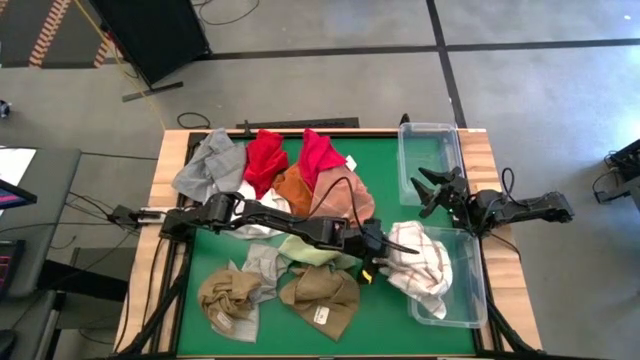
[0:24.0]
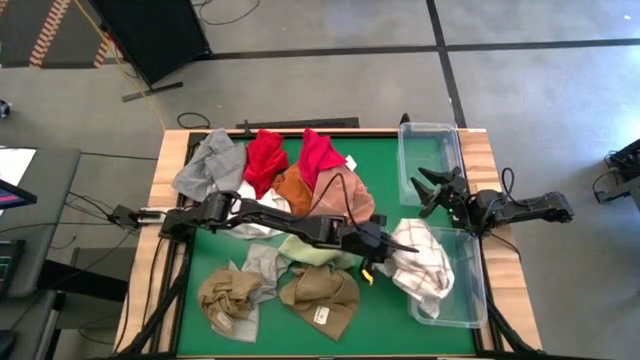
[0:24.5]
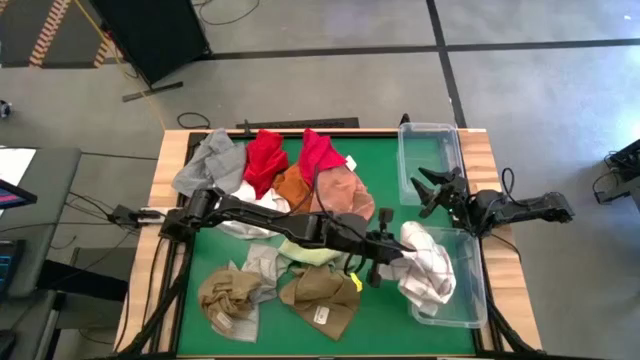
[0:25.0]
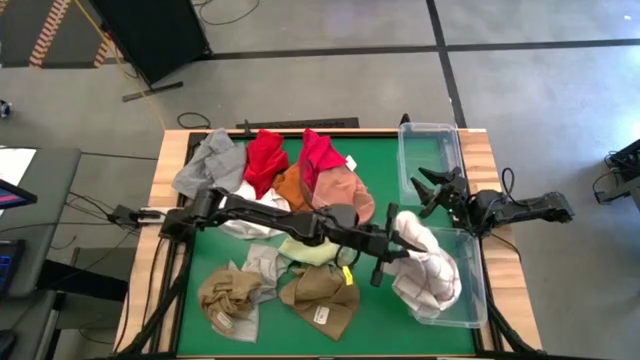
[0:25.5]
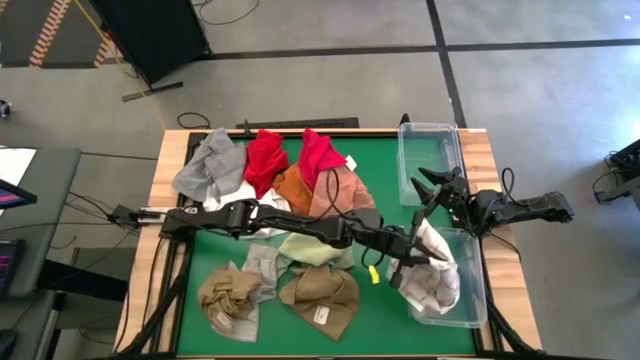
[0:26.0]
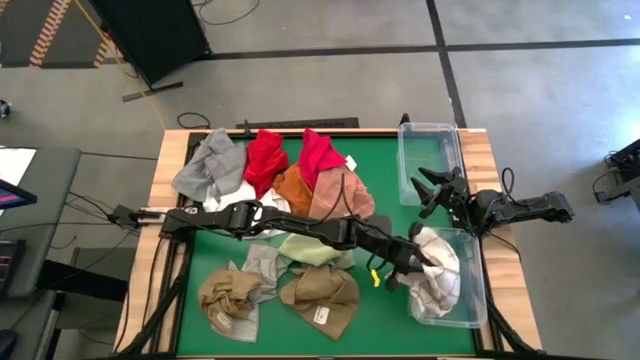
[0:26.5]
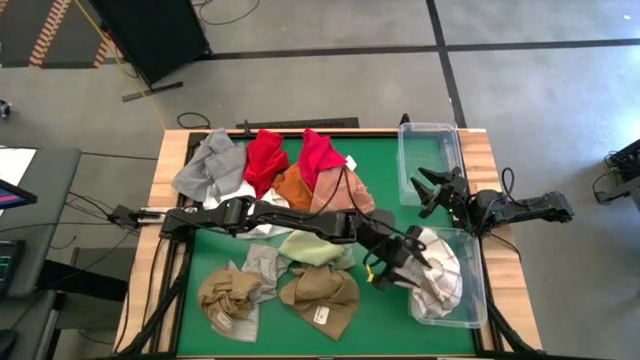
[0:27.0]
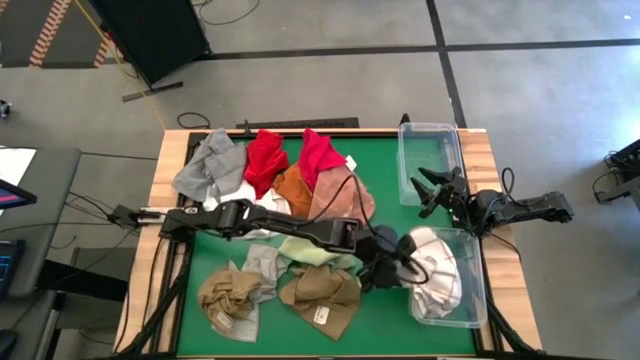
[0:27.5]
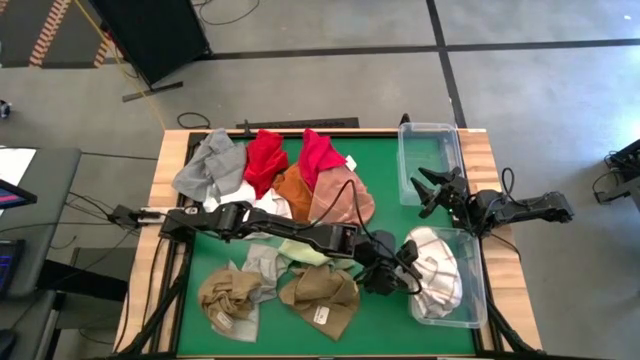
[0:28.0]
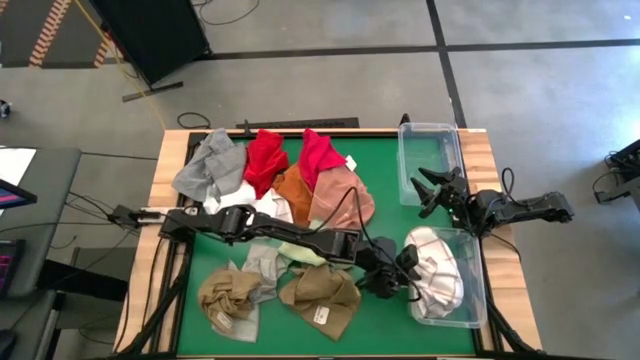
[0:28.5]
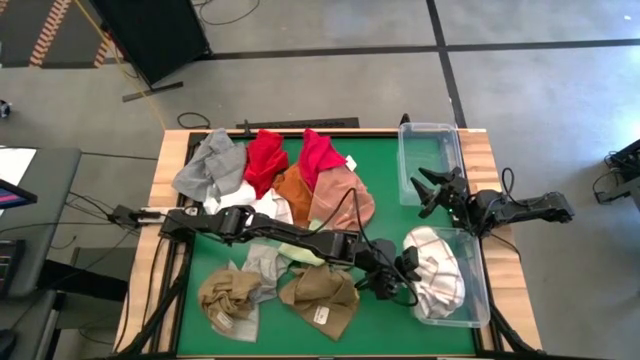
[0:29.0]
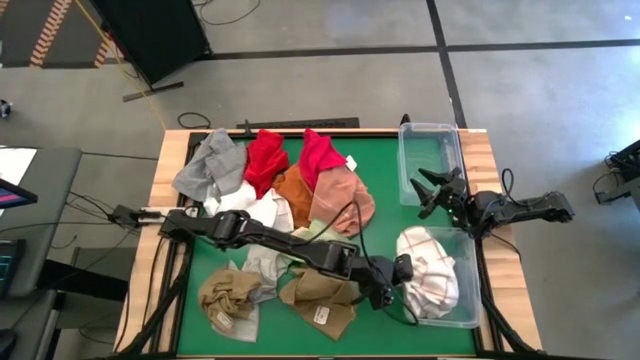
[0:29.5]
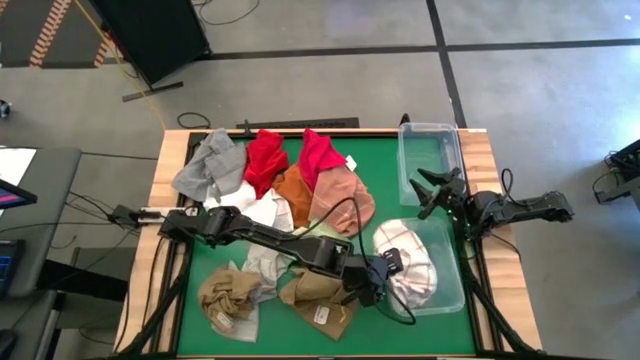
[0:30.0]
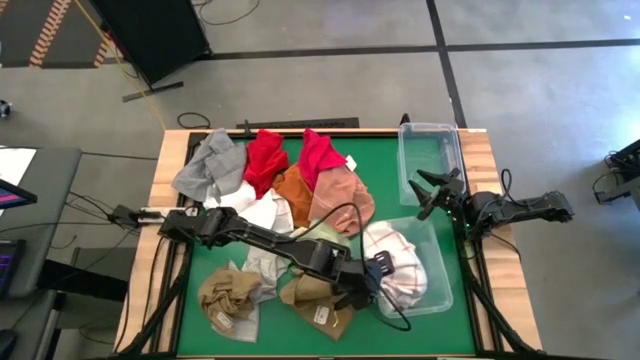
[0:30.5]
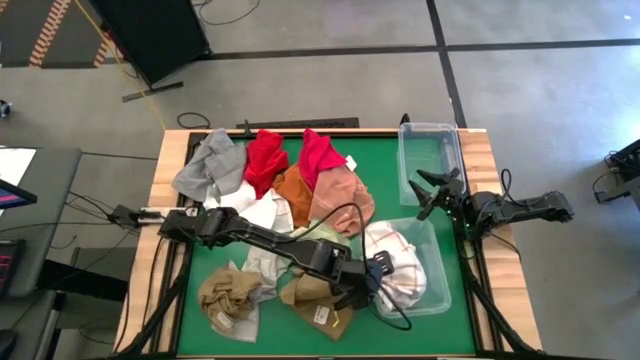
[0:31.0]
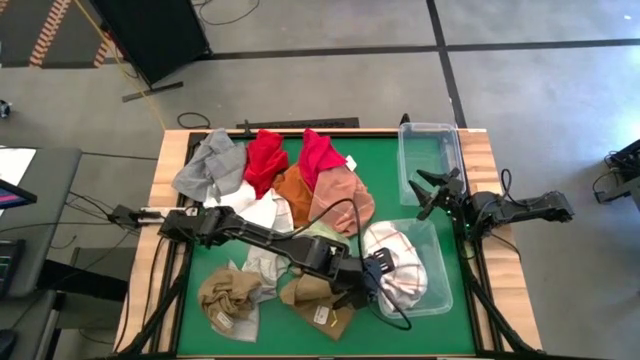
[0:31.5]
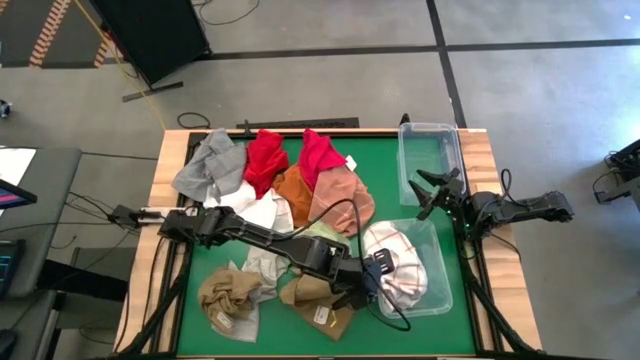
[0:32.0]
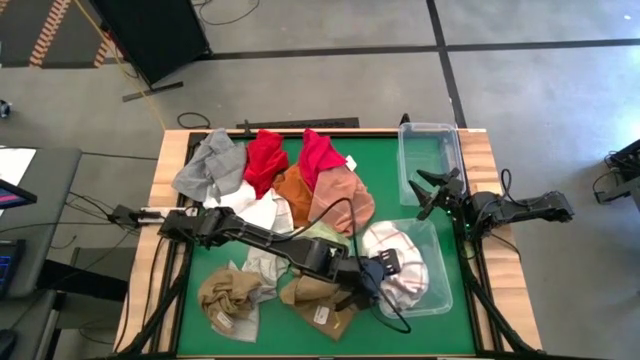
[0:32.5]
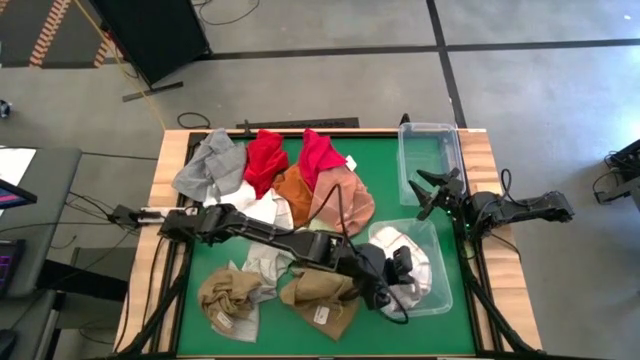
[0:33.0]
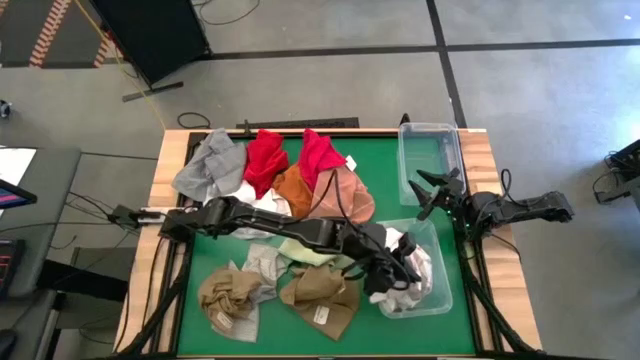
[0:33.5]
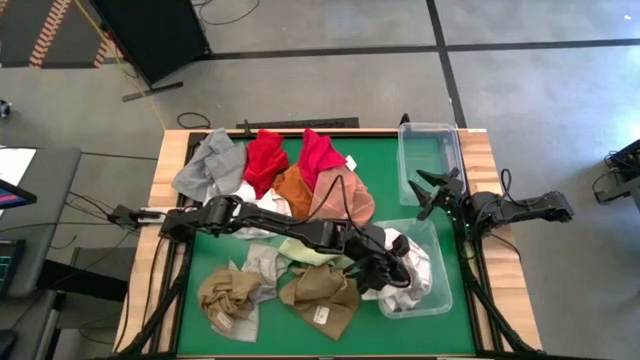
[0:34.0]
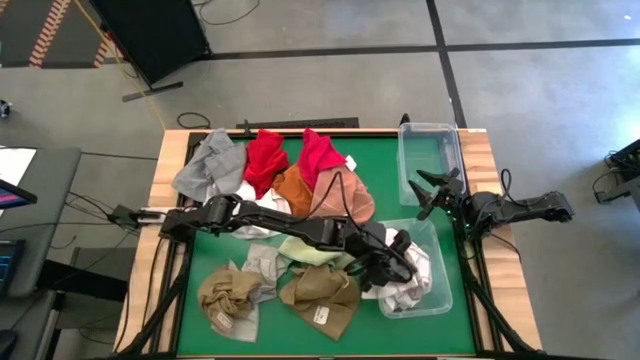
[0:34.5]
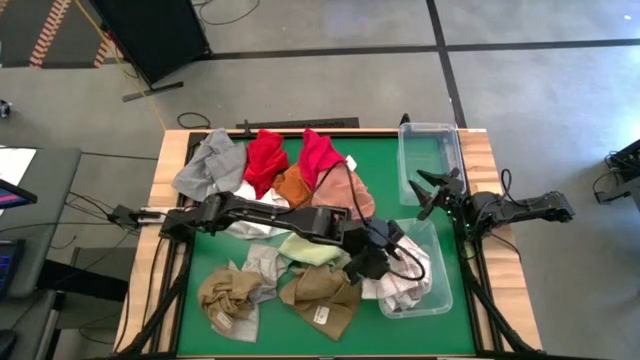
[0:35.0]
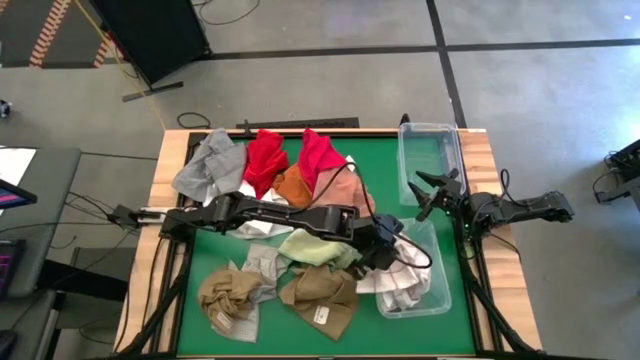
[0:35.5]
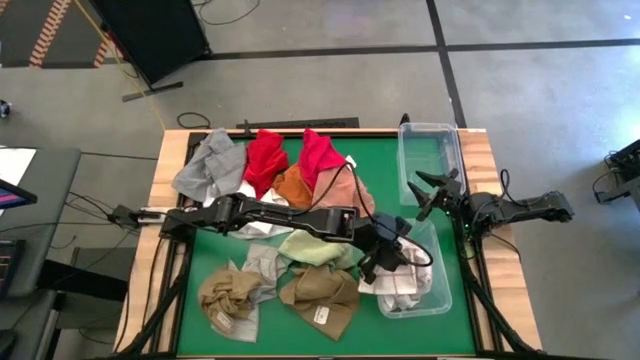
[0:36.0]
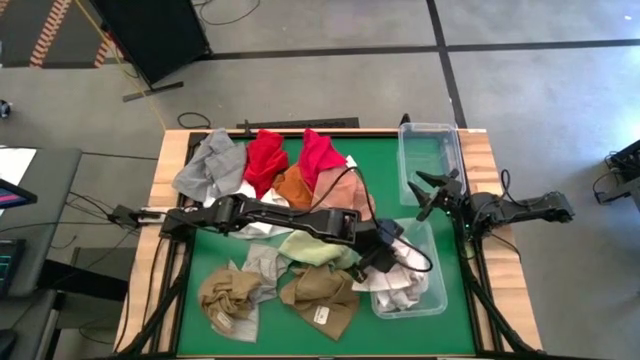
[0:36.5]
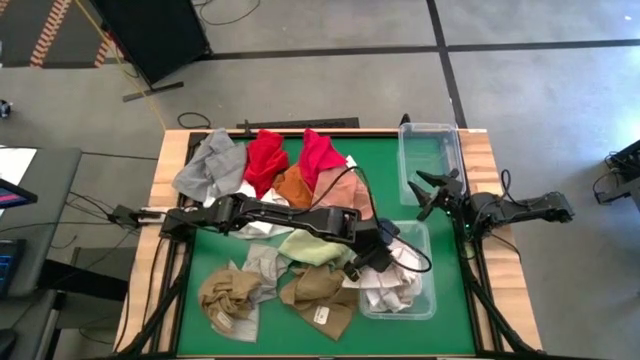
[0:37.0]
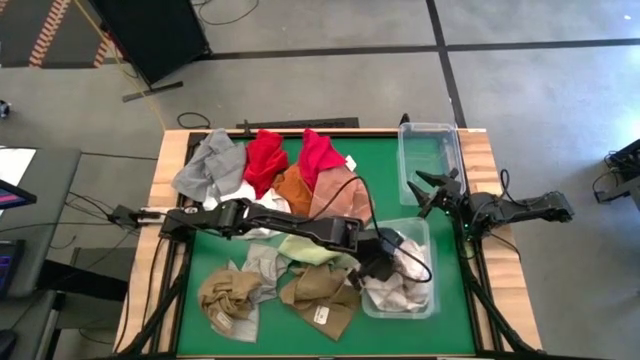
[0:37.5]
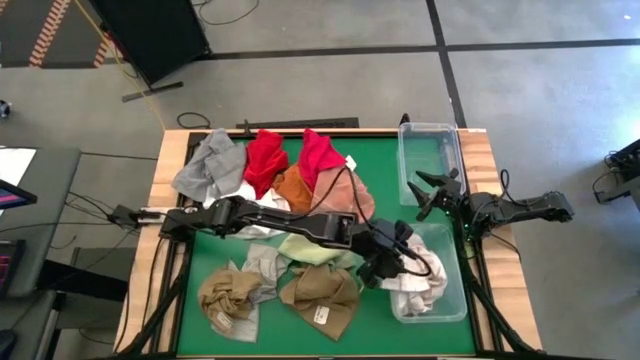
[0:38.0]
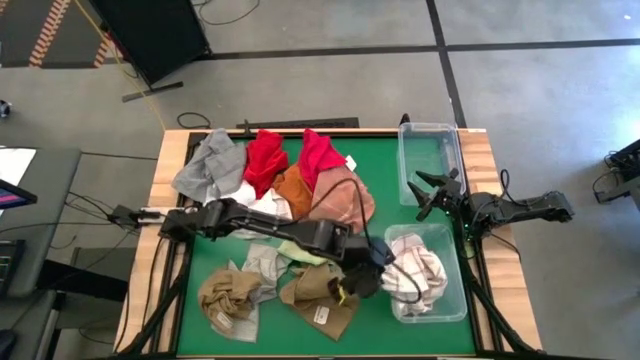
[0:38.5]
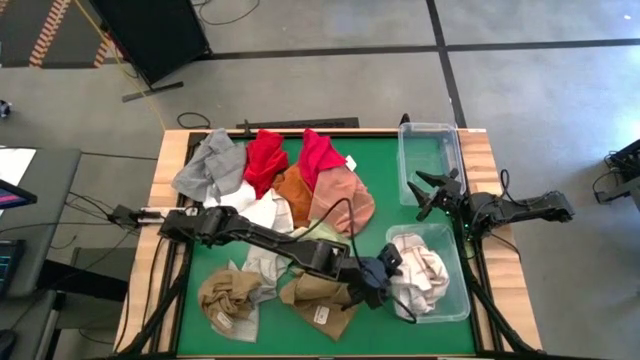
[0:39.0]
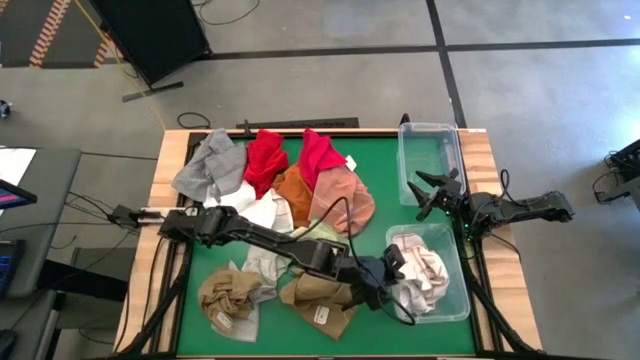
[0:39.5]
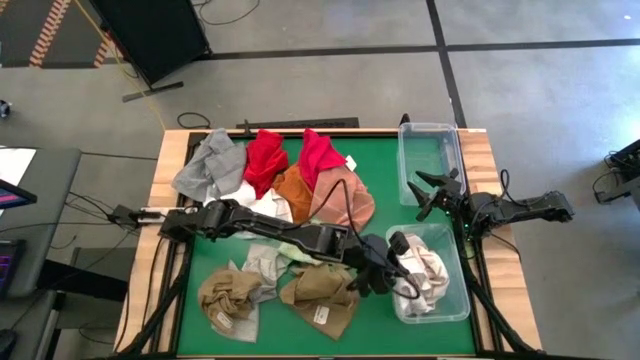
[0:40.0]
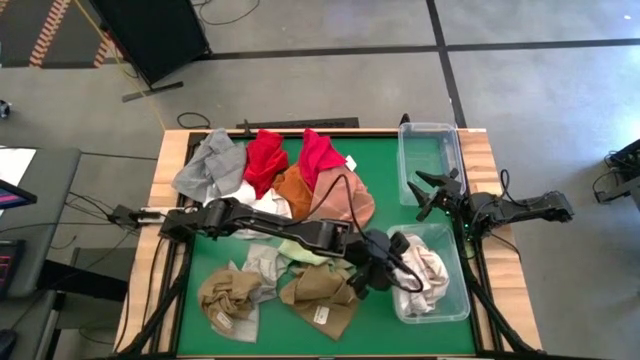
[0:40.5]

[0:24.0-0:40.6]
Task: Sort towels by color in basket
Put the white patterned towel into the bottom transparent bin

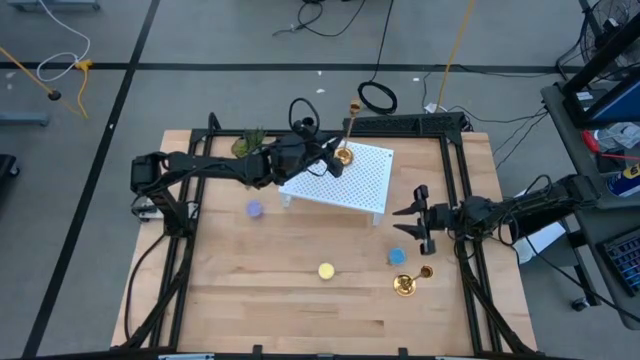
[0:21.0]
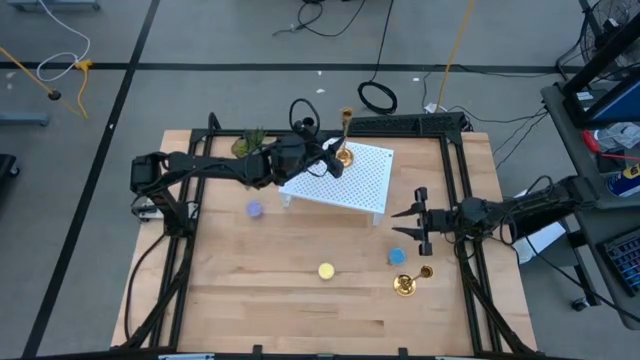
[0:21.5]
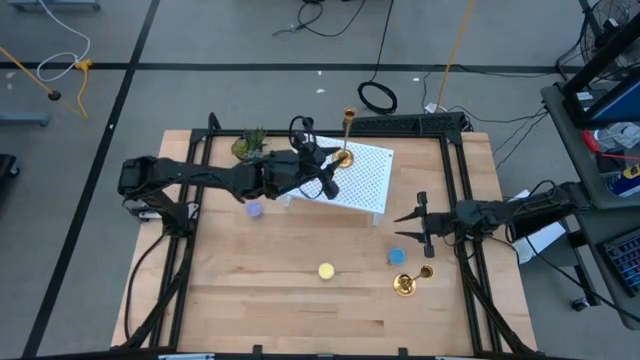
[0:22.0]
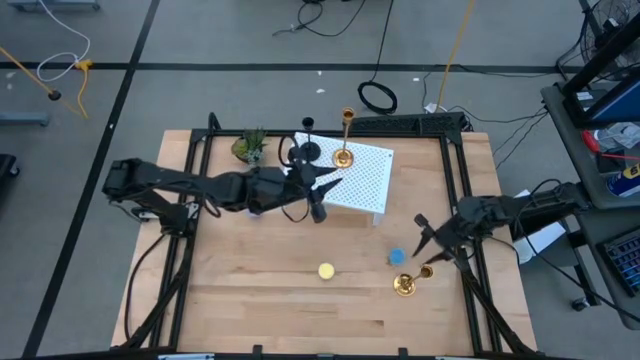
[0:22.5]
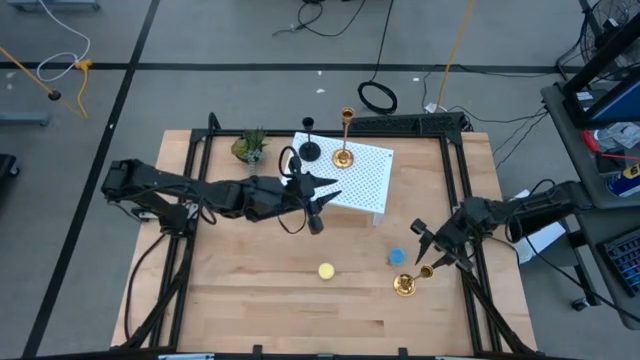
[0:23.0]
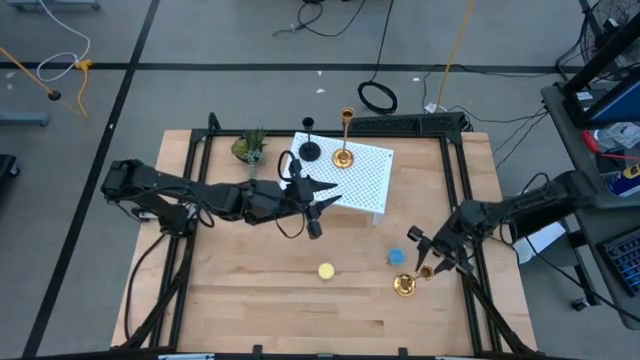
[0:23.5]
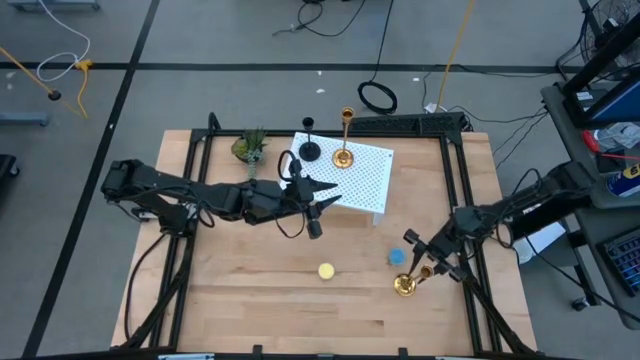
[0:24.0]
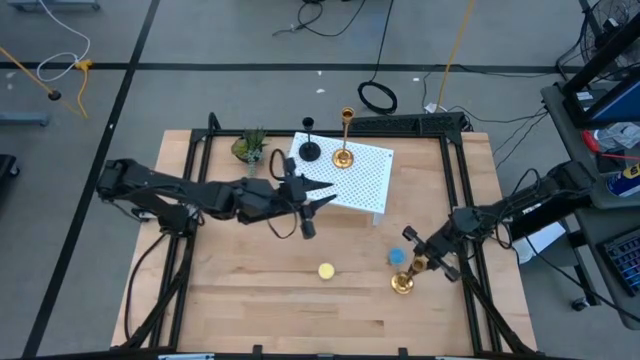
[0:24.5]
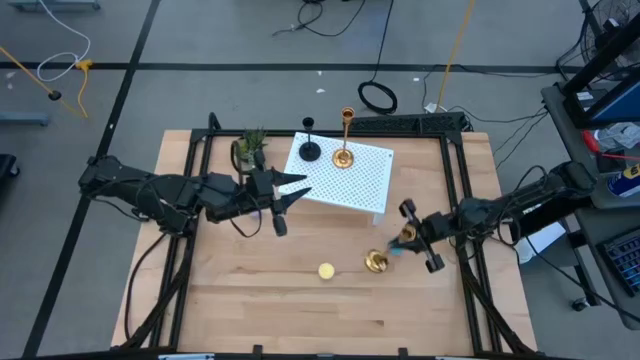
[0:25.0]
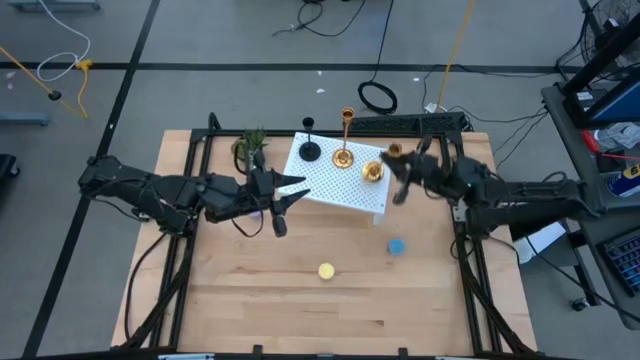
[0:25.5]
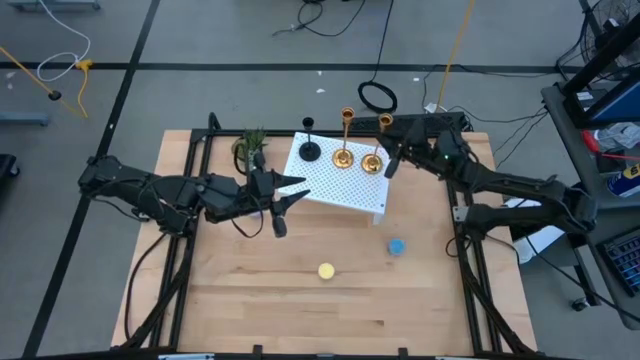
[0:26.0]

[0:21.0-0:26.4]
Task: Pick & Place candle stick holders
Put the golden candle holder on the shelf
